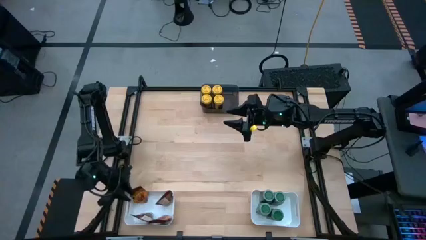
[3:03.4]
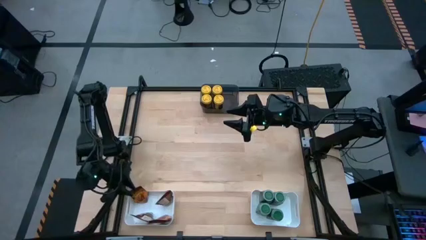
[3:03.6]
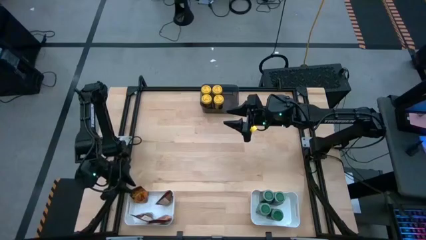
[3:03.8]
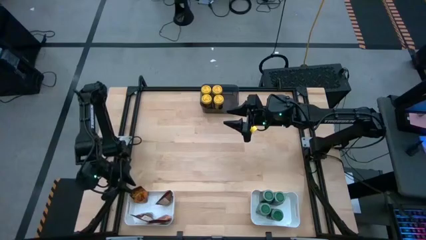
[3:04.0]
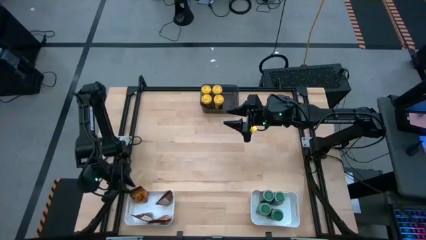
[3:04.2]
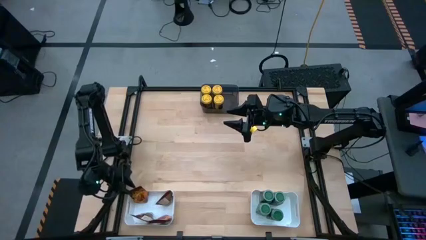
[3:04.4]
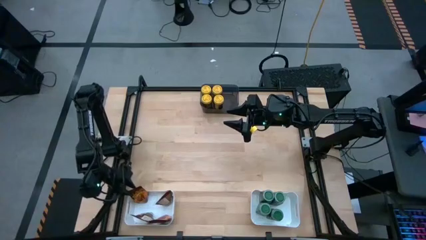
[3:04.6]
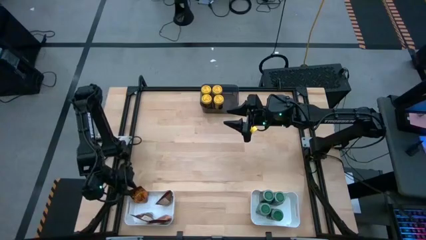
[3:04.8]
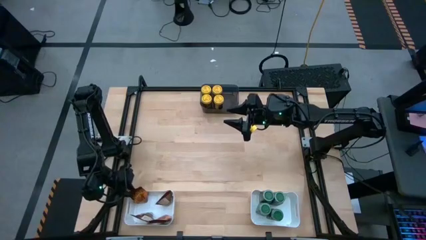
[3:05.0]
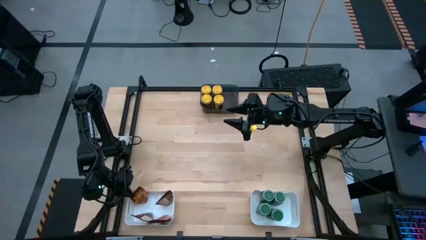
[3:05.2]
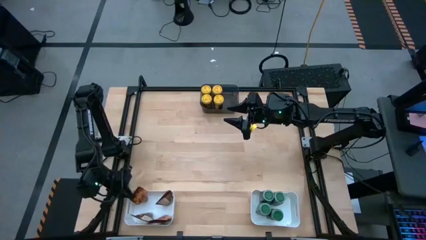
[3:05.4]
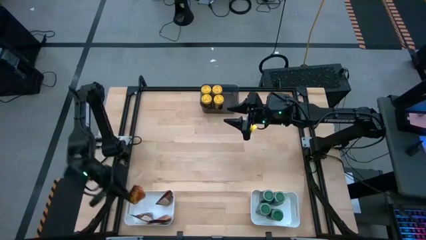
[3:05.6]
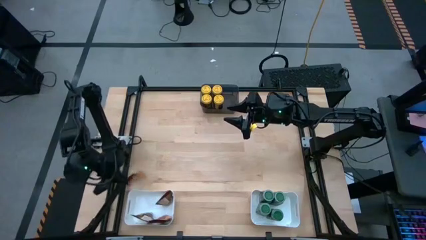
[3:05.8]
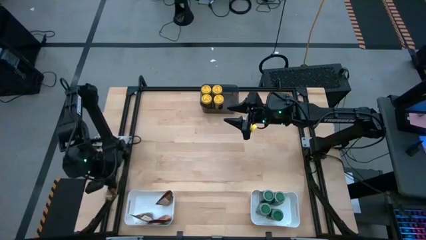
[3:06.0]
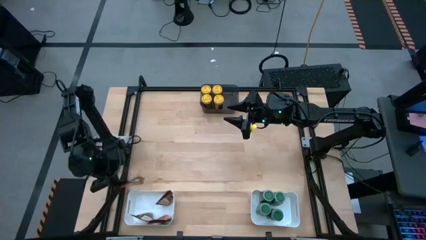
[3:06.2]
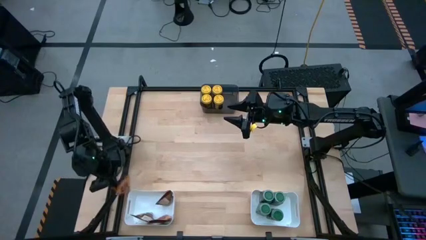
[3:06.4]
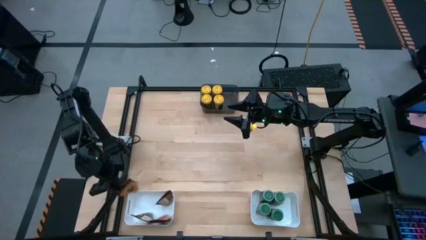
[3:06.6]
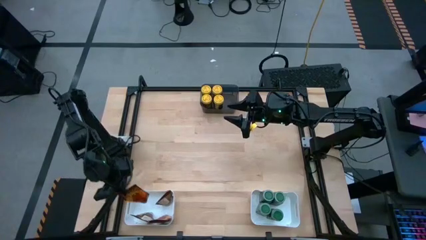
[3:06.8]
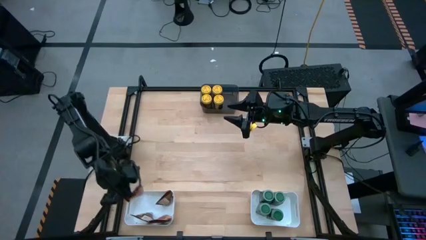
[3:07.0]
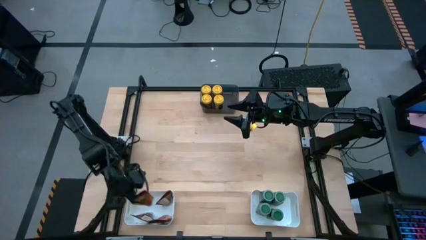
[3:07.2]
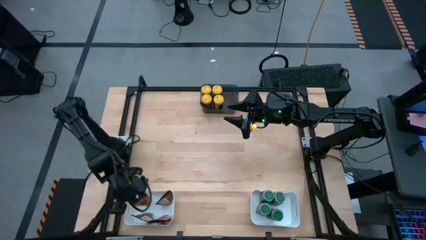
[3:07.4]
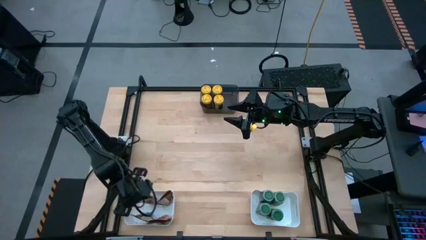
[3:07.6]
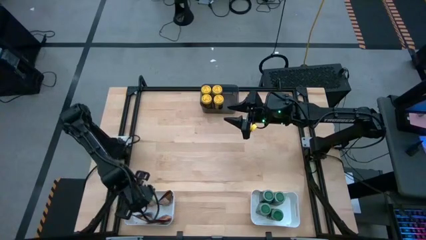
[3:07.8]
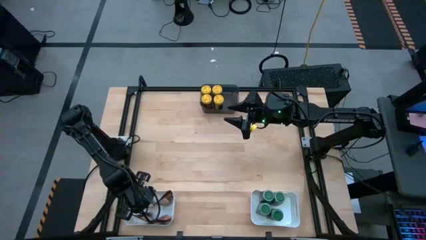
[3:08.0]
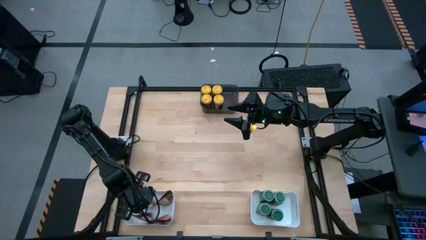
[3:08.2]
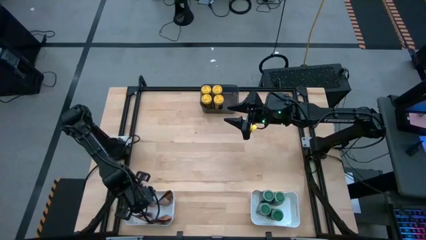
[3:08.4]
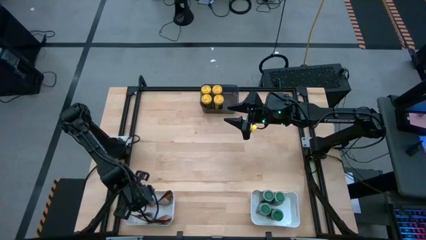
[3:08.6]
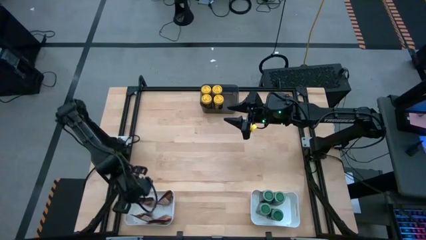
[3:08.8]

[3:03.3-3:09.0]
Task: Sort spices by type
Put the orange seasoning pack into the left white bin

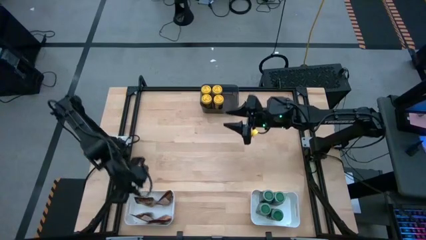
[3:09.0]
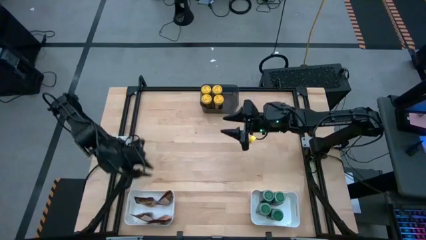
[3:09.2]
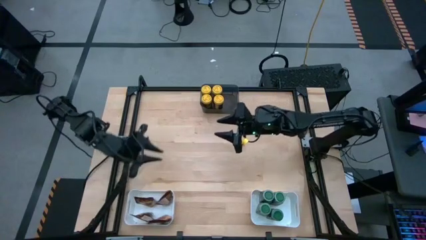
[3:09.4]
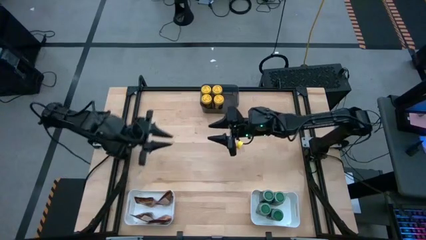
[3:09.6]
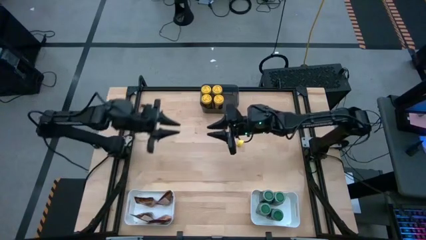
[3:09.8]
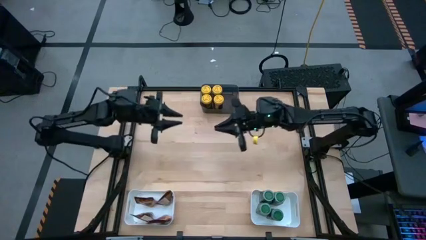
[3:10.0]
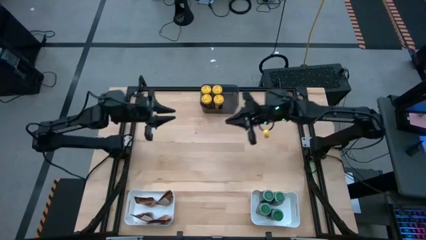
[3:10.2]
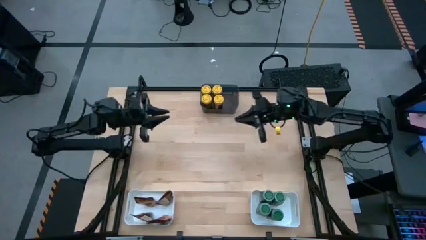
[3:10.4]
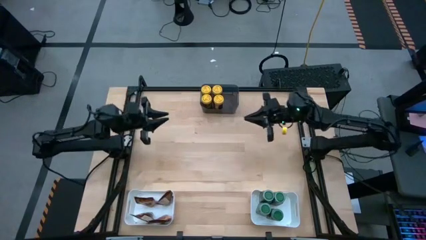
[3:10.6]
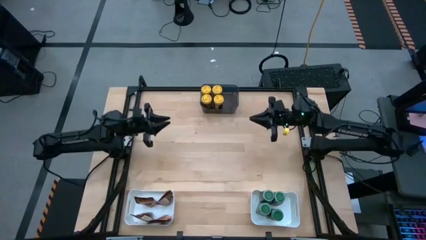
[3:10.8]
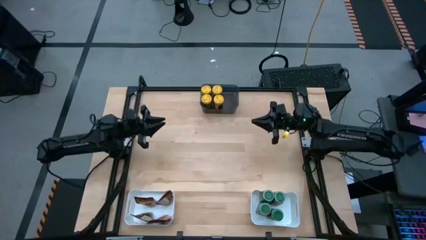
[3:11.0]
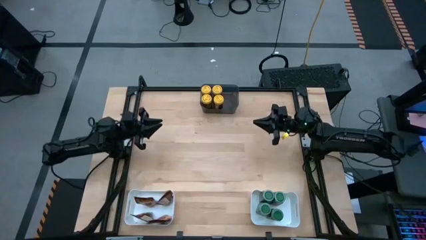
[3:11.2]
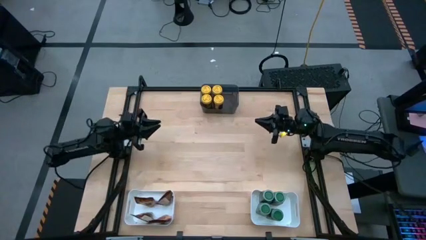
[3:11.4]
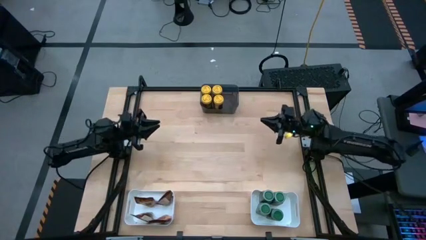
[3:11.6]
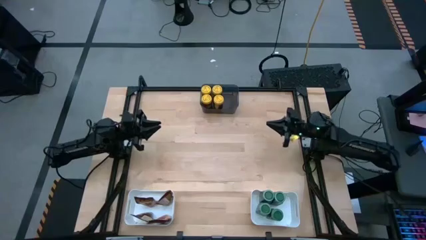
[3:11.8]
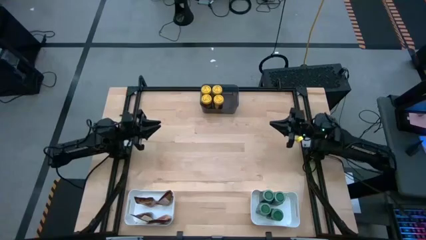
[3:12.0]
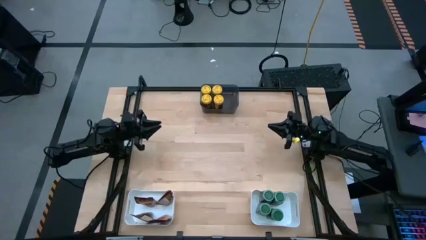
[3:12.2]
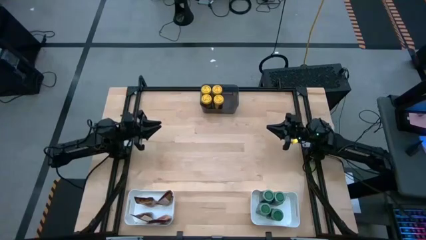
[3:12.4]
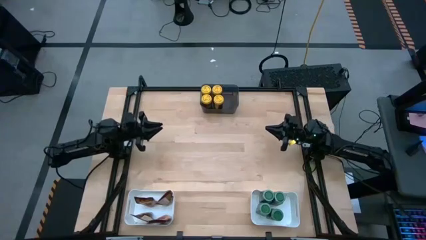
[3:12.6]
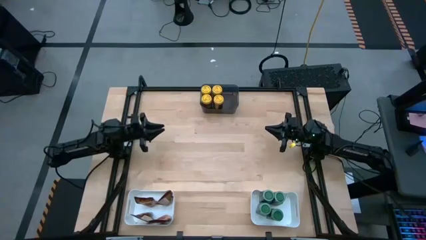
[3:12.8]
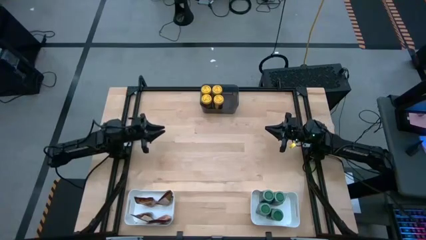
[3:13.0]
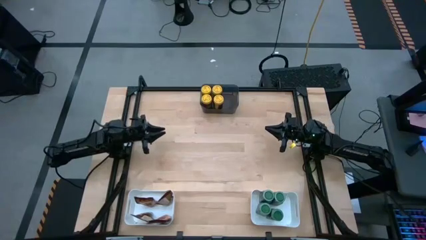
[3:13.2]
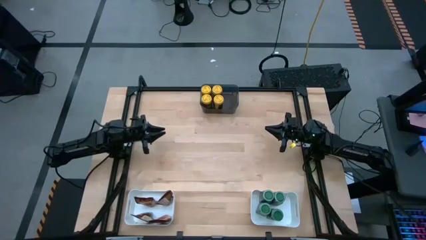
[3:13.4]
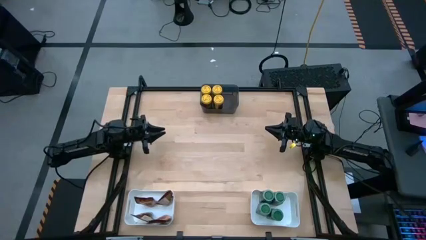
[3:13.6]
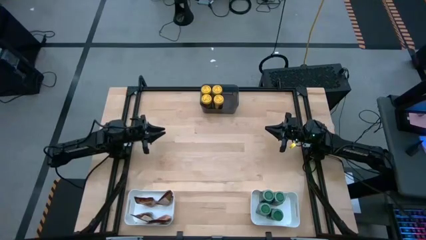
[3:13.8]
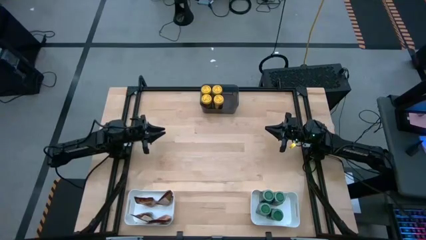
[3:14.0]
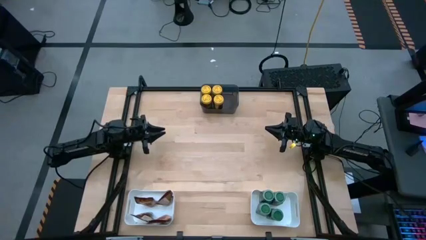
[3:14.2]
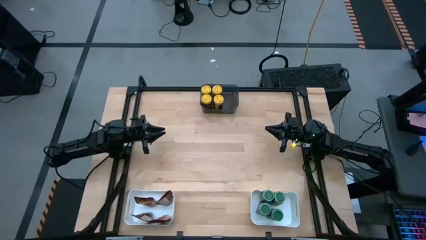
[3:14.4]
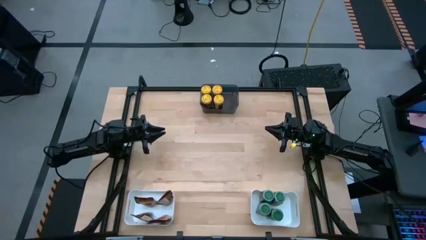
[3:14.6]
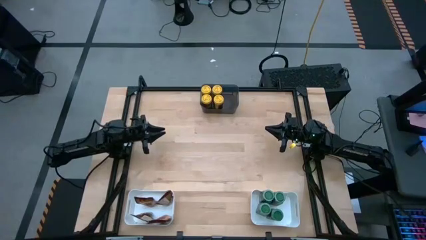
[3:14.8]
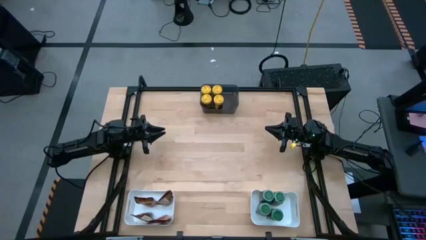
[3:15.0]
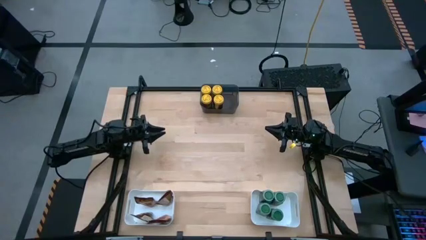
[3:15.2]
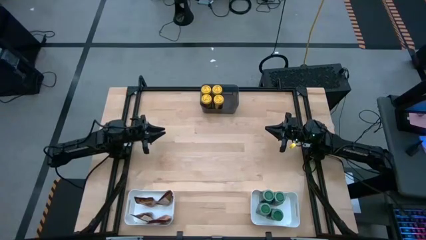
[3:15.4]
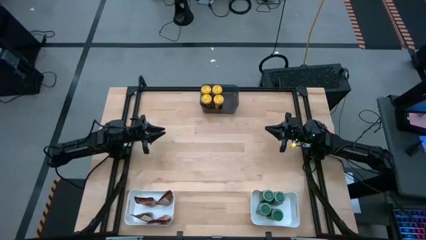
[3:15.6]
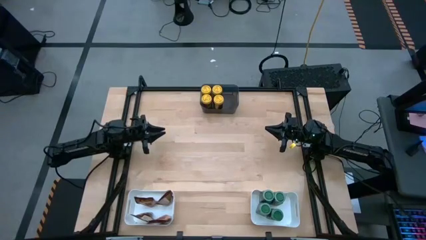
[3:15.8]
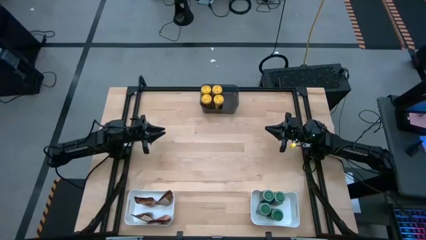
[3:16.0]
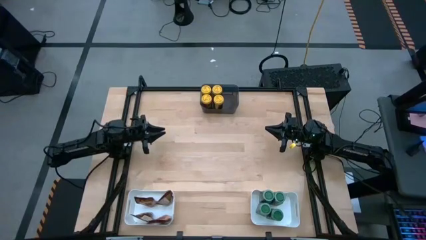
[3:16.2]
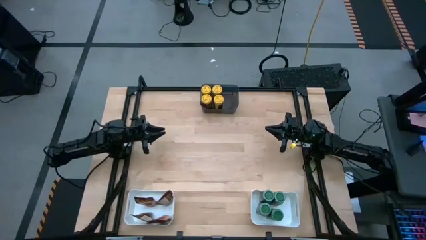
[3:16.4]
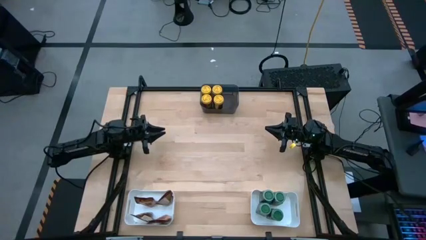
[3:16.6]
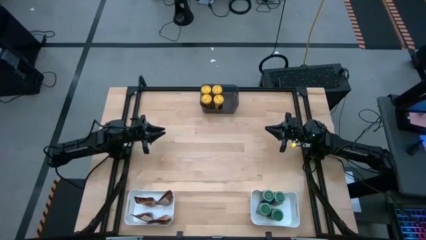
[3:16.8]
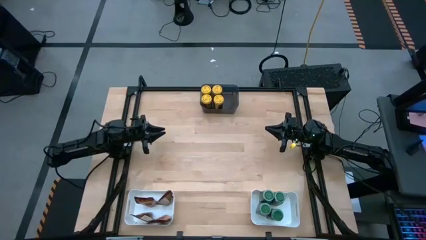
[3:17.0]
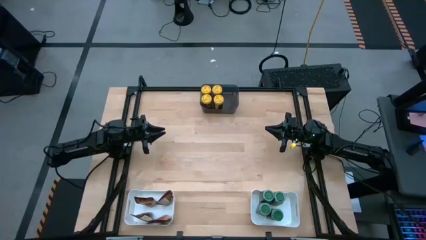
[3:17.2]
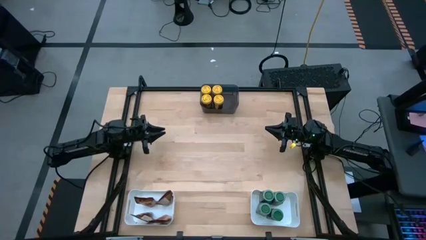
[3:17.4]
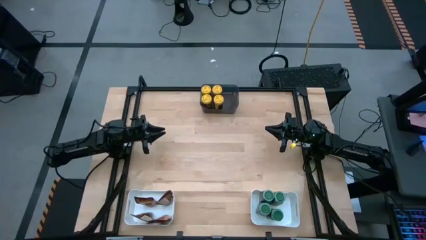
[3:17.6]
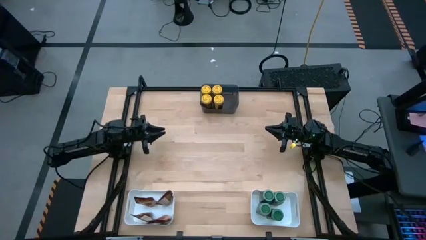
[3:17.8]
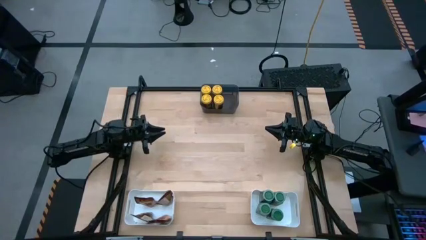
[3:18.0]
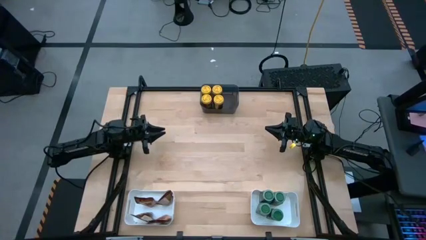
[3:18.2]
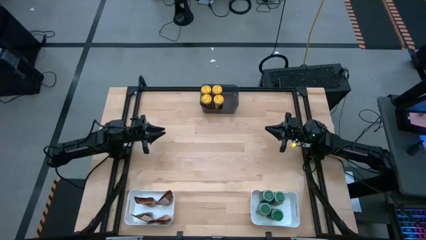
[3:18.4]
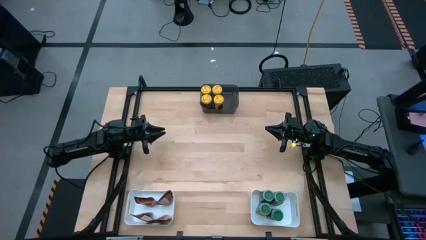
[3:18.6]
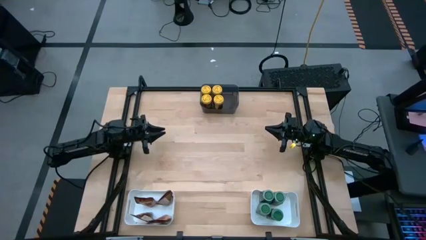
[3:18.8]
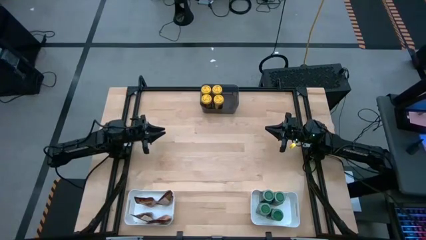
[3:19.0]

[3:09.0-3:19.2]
Return to Home Position

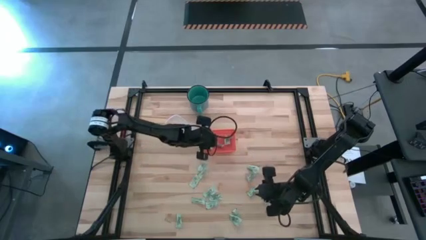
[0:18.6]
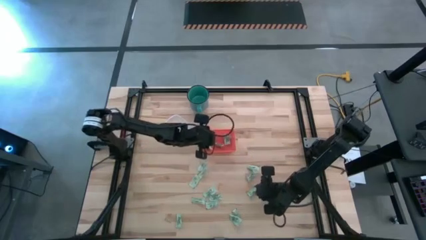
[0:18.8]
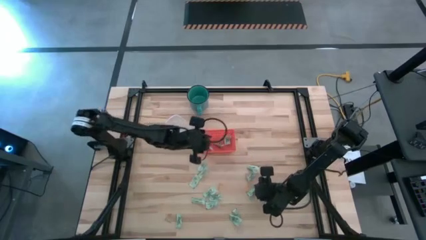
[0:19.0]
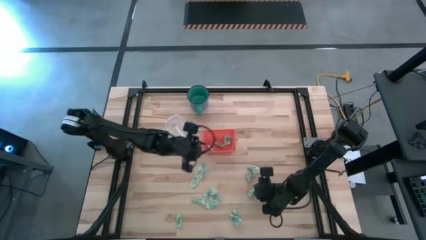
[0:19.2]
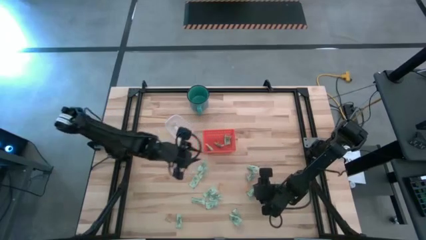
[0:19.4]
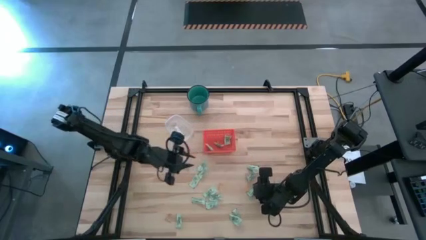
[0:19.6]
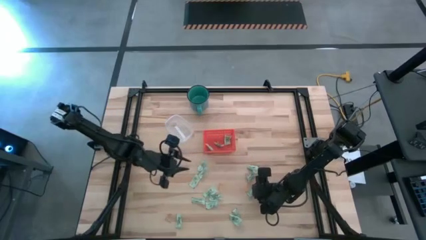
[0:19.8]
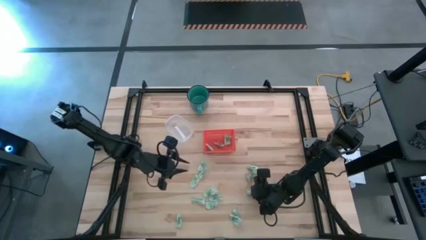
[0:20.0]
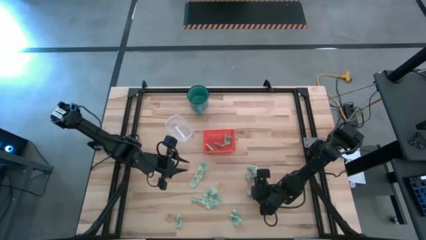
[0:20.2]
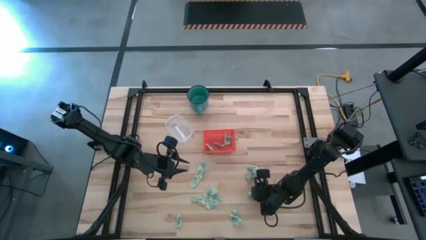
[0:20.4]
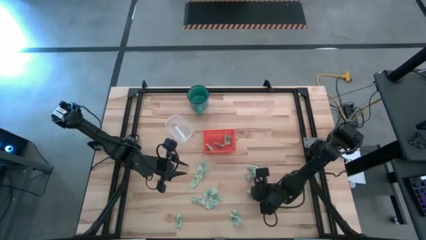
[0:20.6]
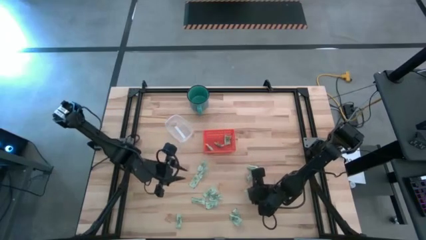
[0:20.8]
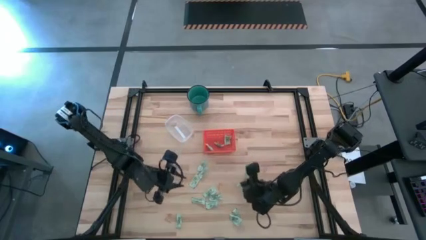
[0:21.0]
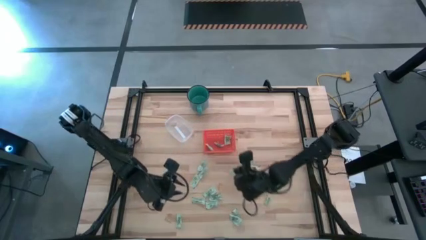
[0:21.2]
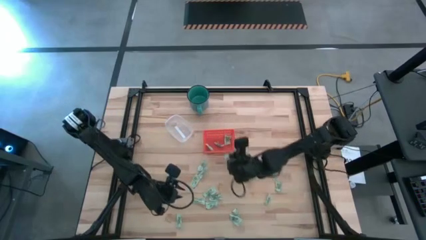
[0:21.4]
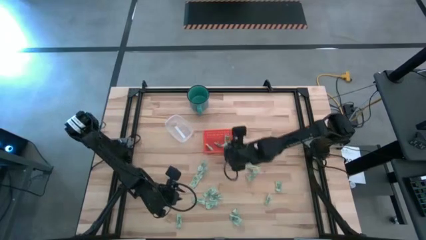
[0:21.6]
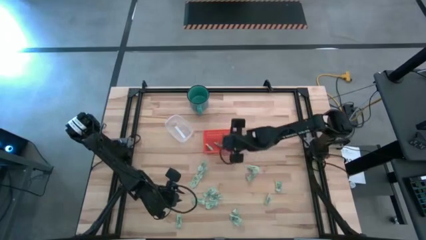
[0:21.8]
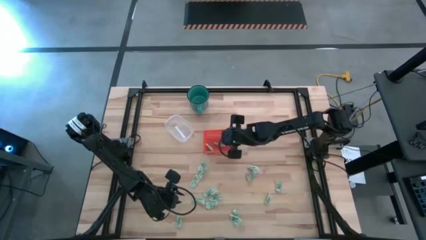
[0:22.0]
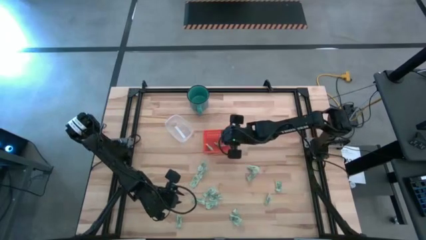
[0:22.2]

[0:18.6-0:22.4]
Task: Pick and place items into bin
Put the stevia packet into the orange bin
